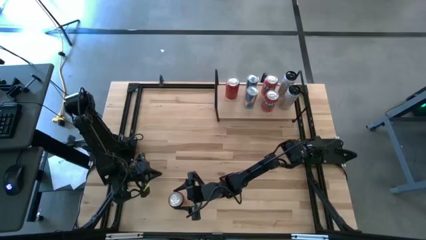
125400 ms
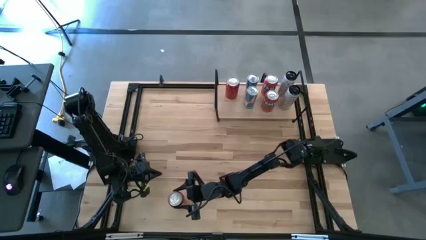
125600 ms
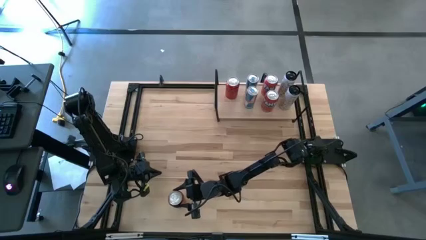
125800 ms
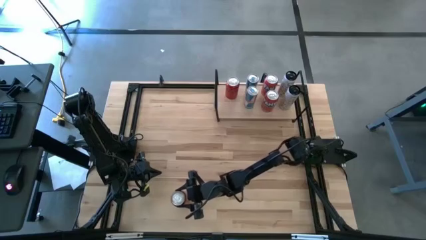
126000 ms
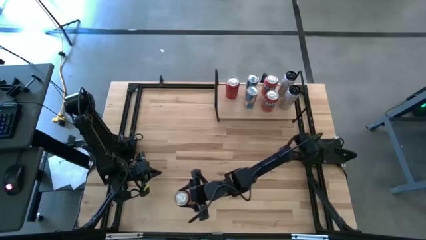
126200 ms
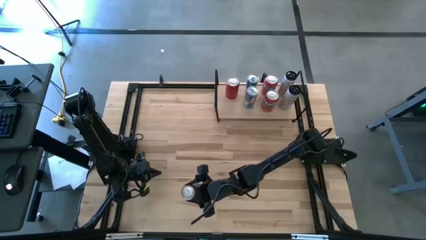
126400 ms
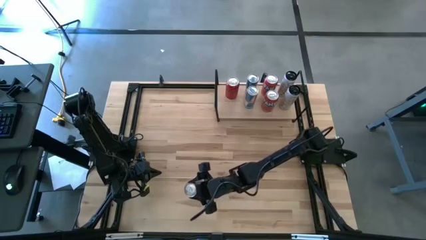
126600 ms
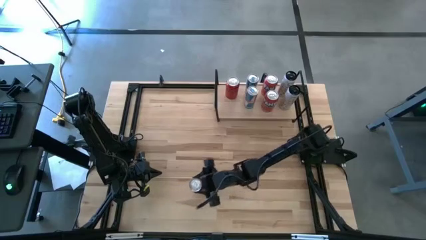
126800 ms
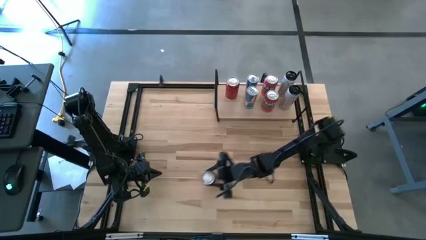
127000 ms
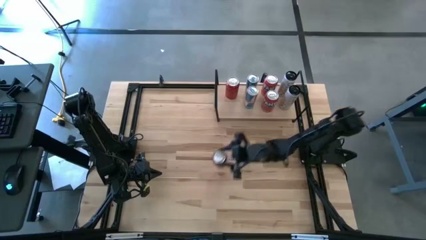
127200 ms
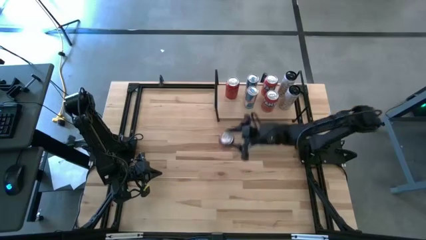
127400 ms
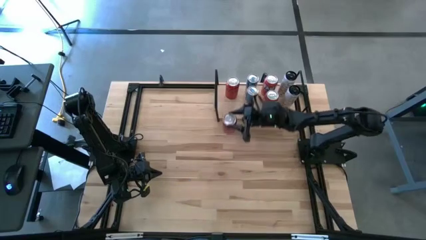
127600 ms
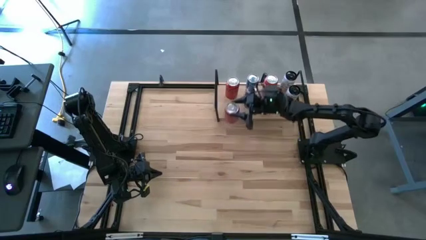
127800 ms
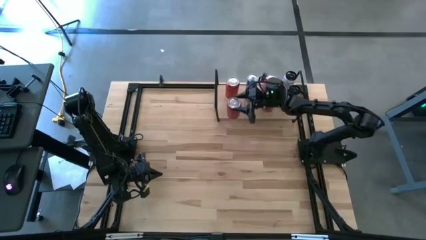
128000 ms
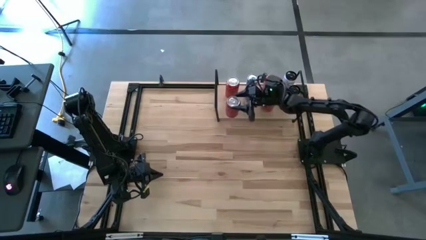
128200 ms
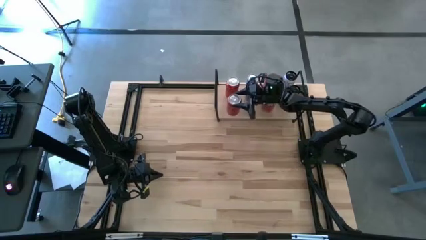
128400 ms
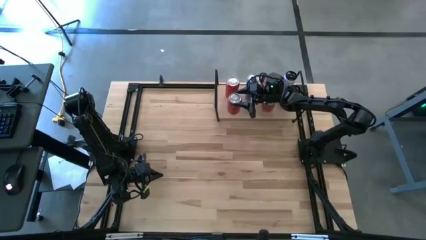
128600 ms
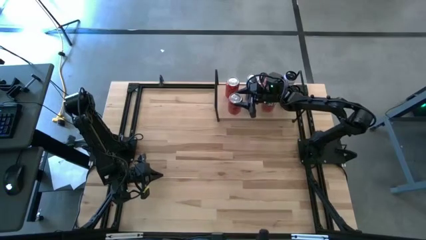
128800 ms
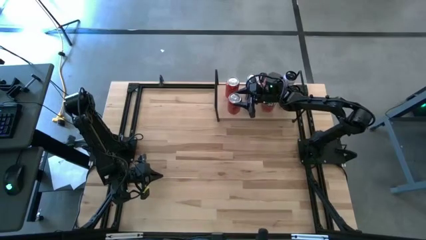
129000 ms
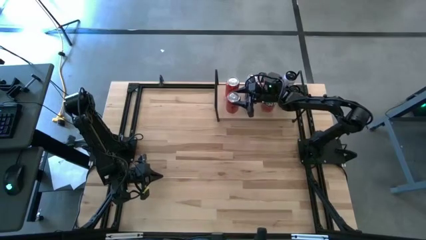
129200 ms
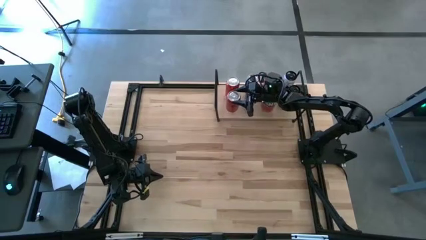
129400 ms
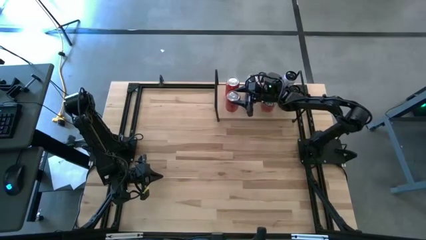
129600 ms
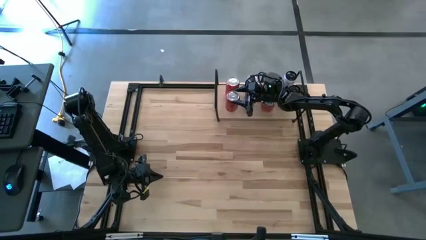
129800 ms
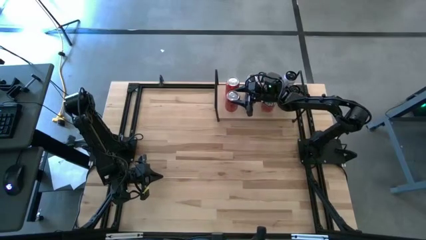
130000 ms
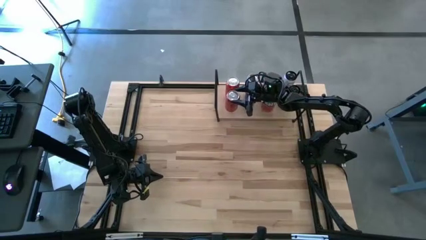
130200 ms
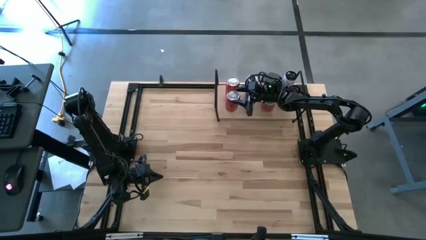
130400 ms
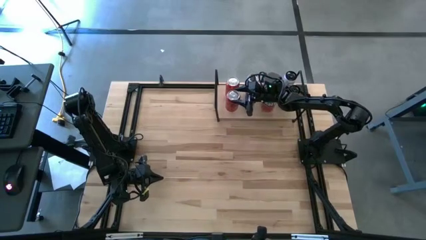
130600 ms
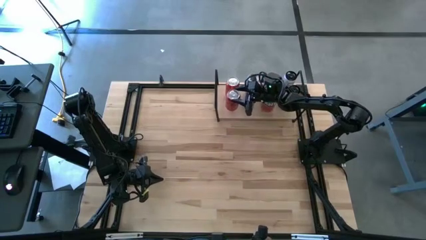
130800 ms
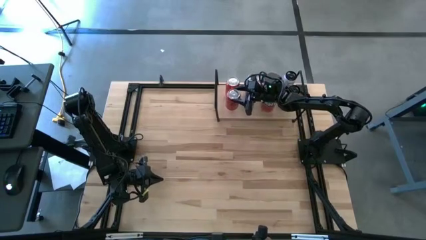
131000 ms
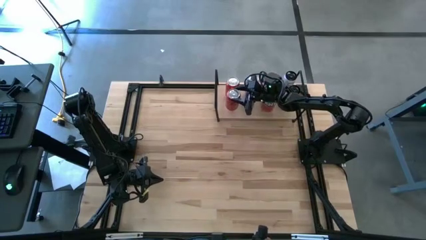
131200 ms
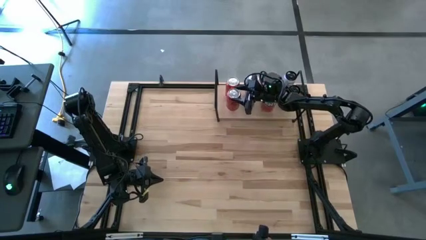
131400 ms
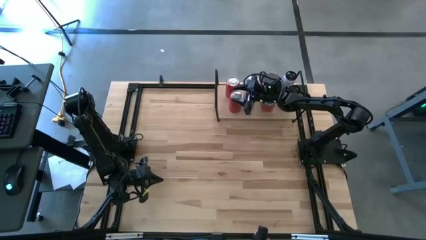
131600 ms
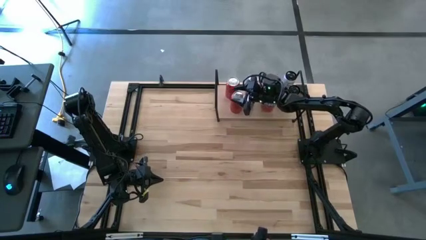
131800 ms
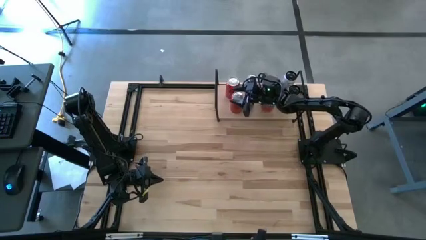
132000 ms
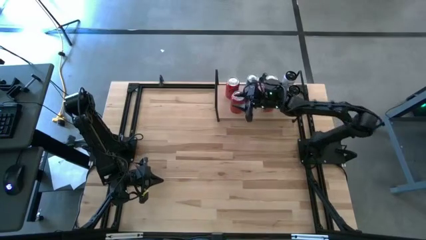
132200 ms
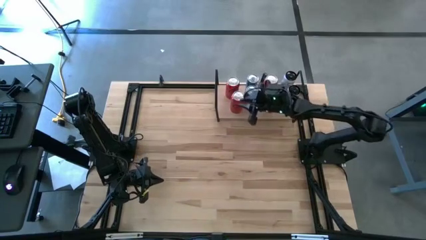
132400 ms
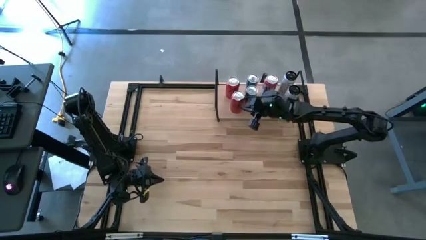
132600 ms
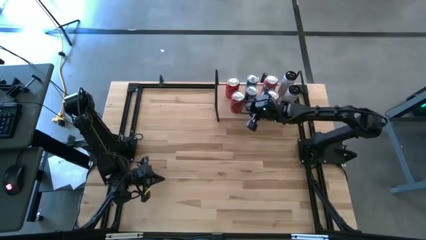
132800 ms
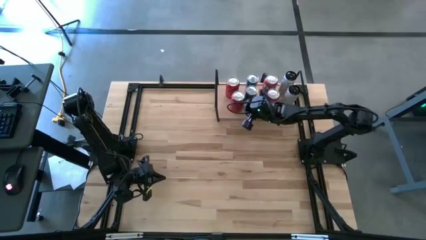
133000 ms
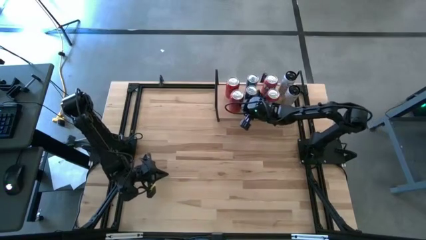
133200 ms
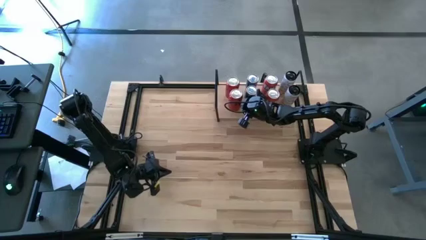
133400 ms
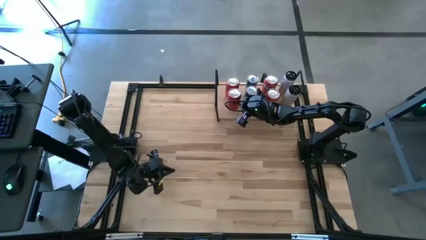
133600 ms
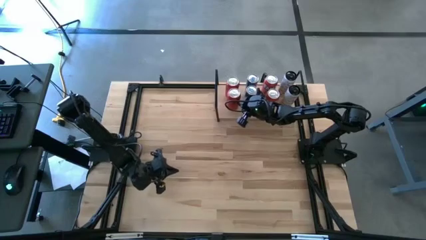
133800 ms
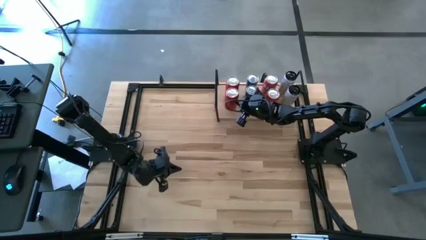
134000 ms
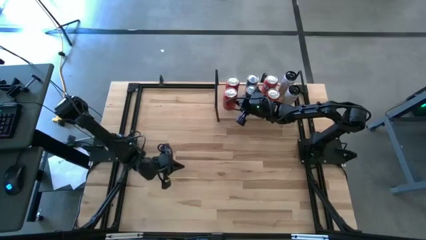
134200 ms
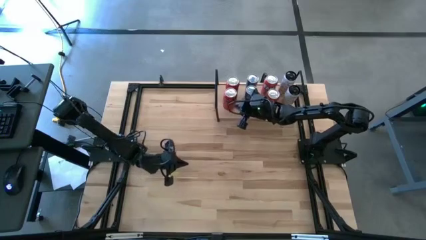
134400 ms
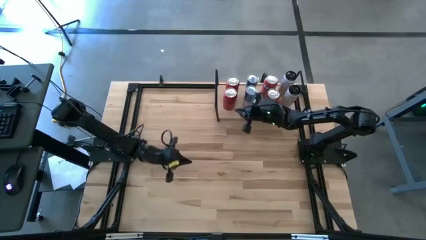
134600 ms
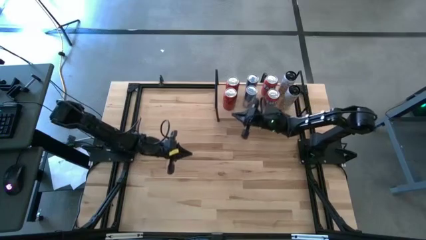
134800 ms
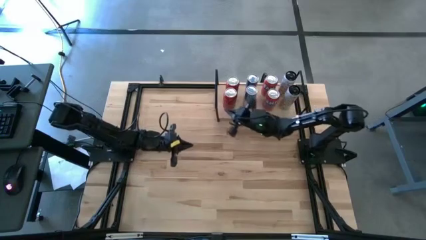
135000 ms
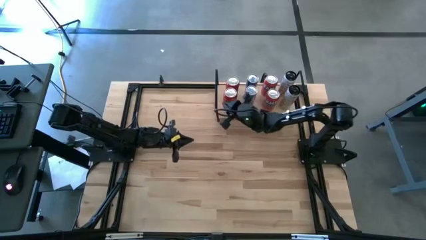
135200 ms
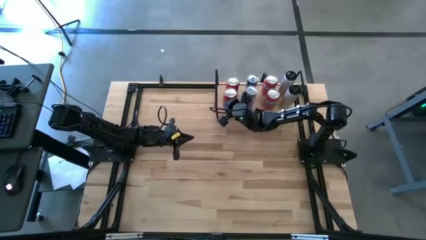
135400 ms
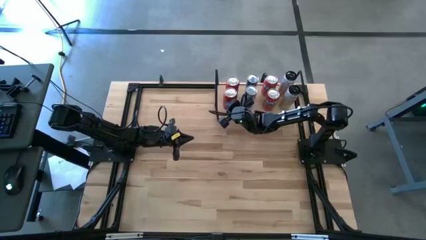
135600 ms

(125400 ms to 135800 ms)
Task: Place canned beverage on shelf
Put the red-black soda can on the shelf aligned with the other red-black soda can

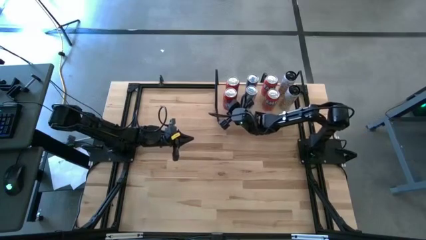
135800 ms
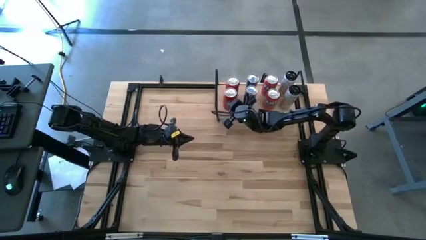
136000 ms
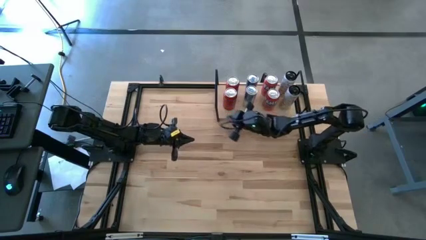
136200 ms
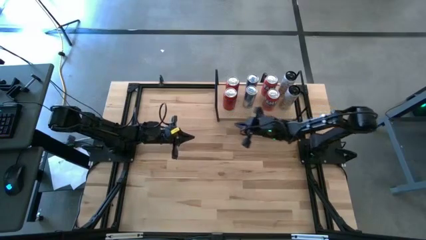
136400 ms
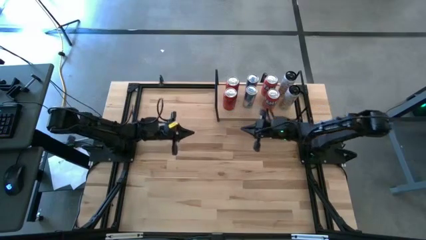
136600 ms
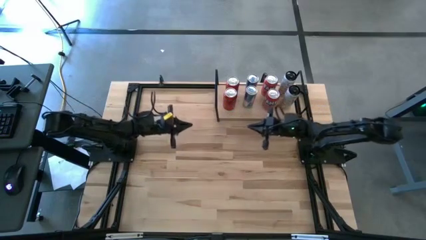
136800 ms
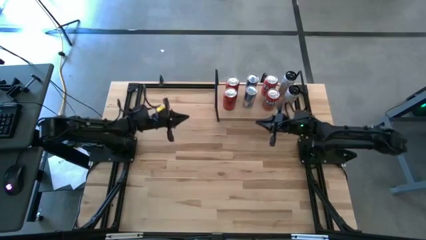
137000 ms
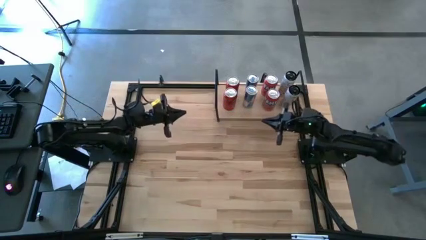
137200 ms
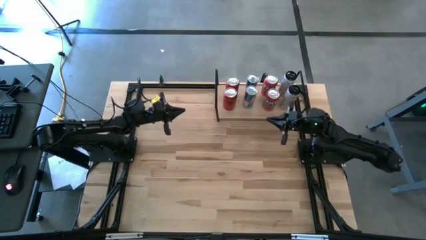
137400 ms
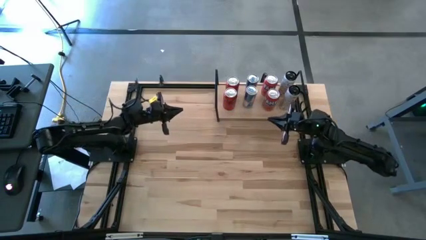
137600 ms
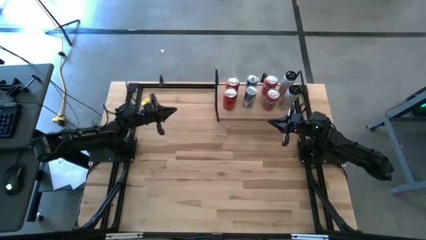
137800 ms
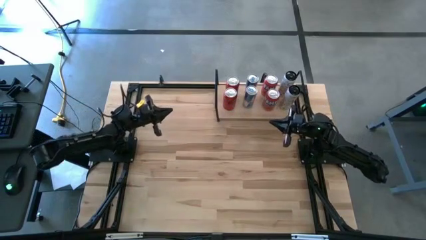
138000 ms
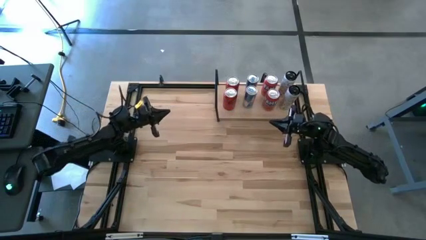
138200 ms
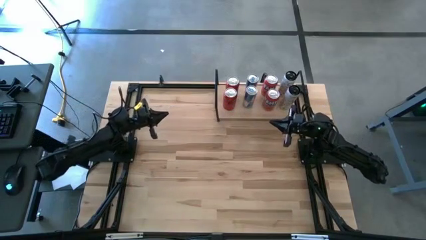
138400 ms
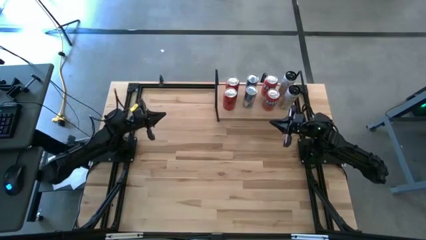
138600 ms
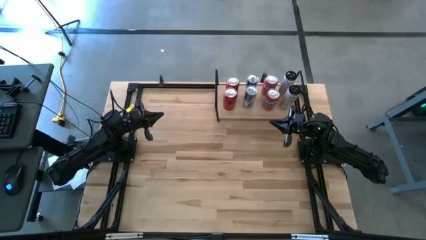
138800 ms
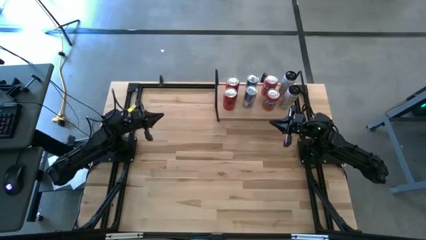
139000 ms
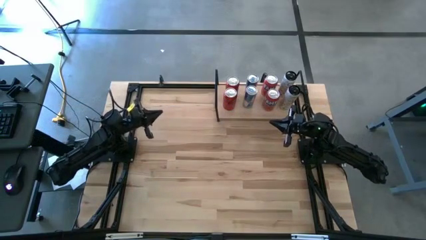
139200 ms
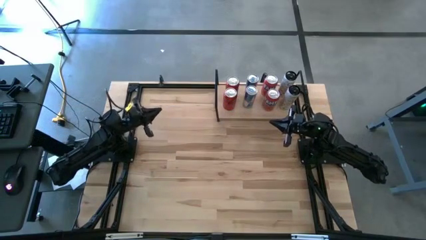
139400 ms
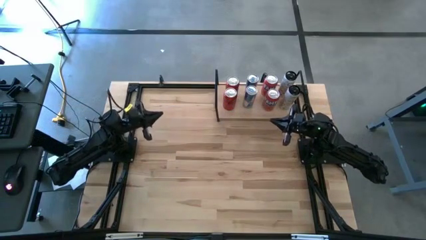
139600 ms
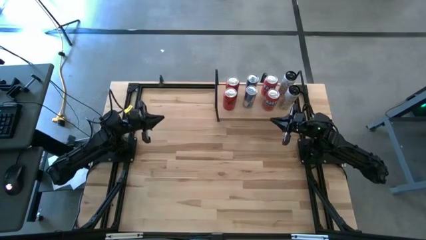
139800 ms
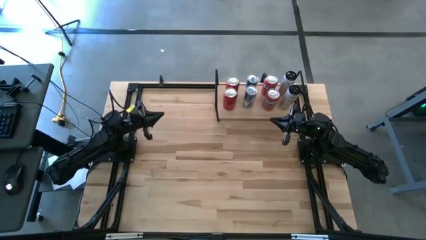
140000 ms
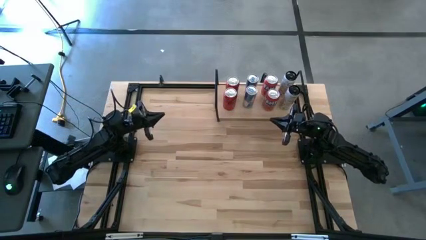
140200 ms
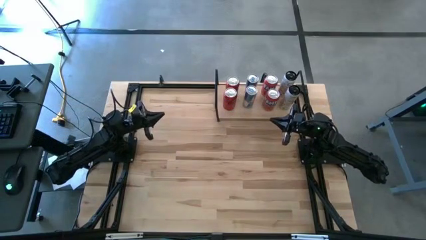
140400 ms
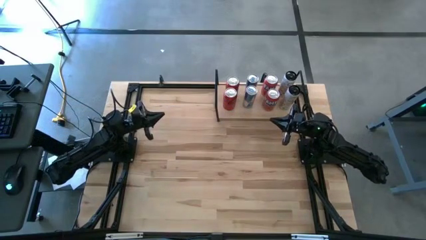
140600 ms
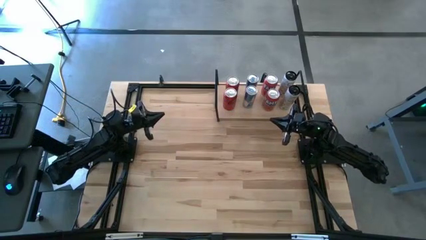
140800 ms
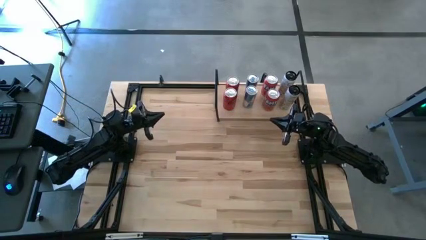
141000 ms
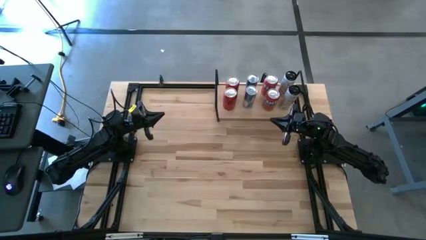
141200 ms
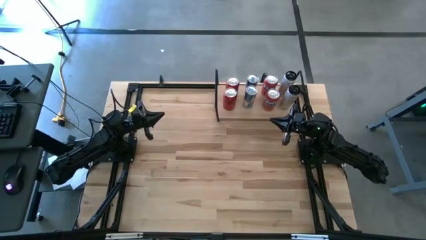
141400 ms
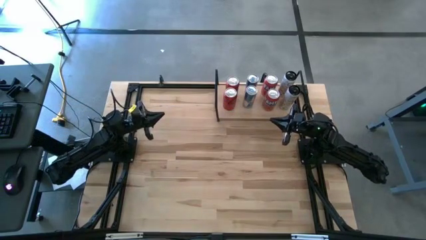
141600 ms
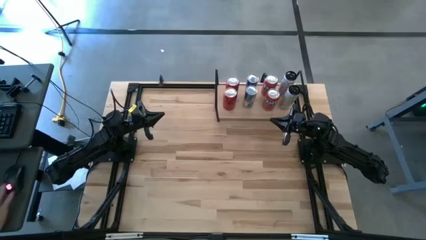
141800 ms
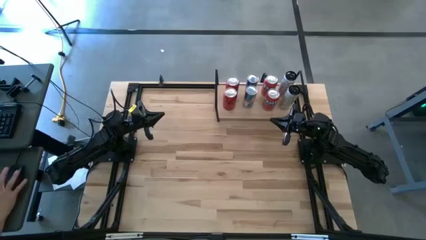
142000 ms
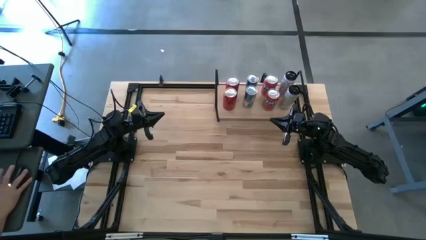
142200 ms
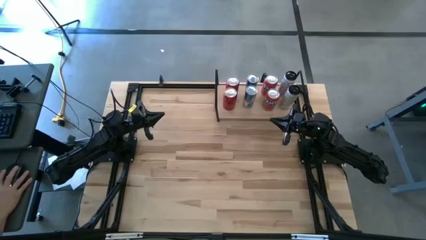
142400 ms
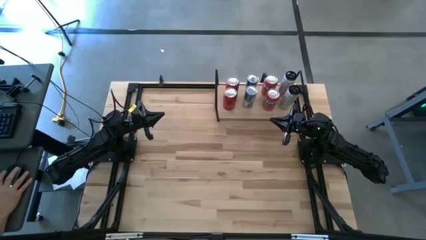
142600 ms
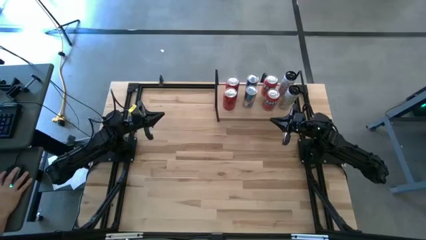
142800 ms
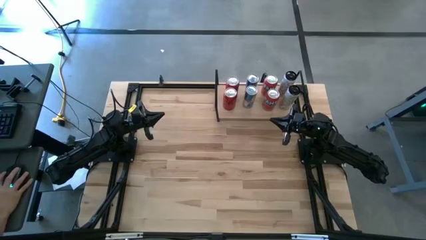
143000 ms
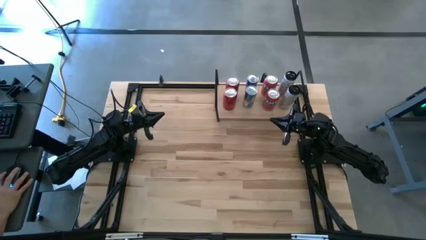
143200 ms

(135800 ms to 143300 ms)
Return to Home Position
